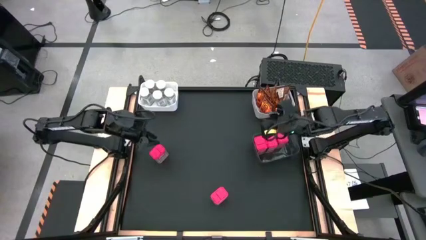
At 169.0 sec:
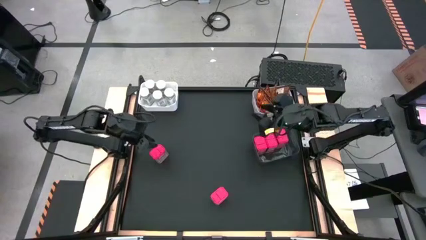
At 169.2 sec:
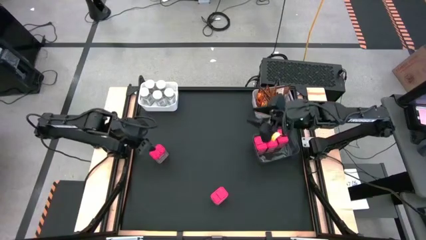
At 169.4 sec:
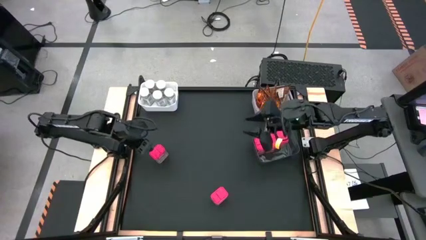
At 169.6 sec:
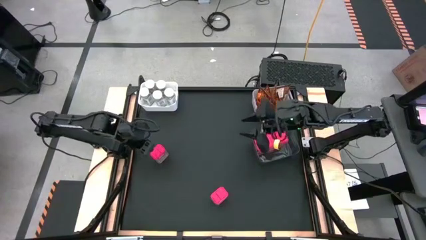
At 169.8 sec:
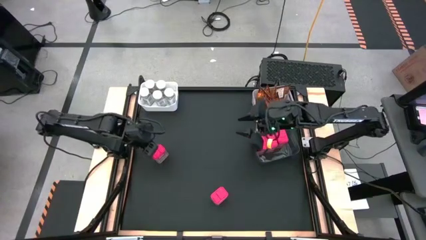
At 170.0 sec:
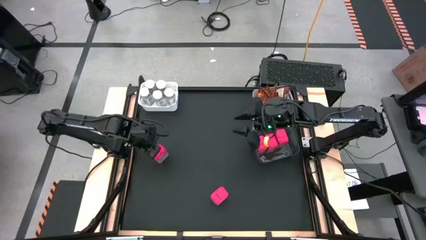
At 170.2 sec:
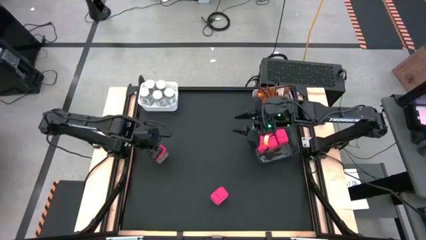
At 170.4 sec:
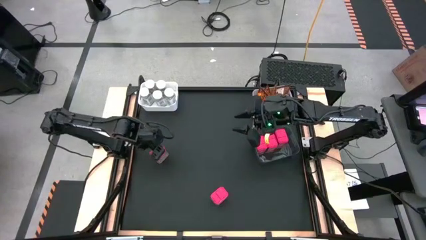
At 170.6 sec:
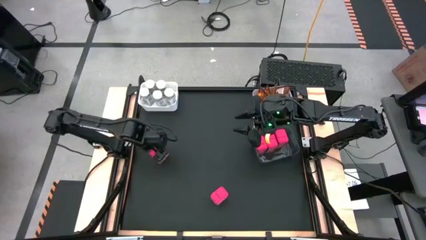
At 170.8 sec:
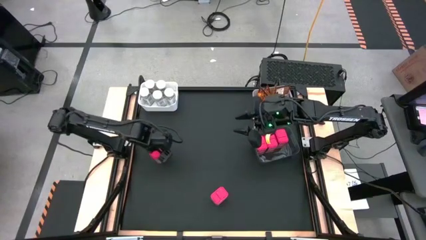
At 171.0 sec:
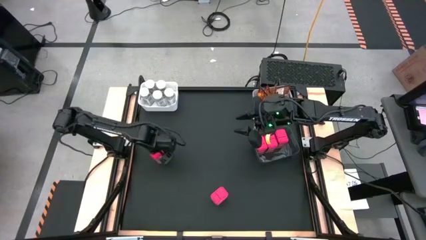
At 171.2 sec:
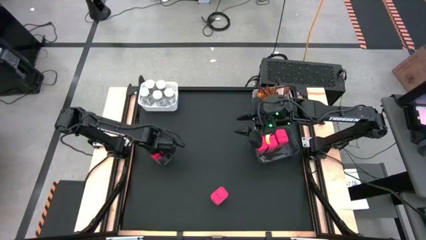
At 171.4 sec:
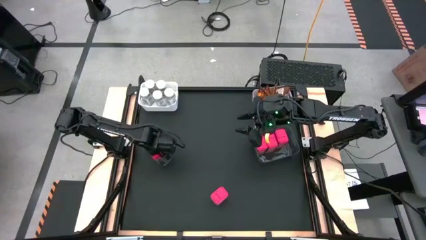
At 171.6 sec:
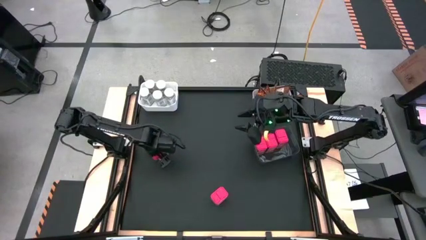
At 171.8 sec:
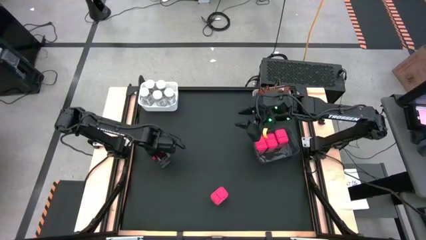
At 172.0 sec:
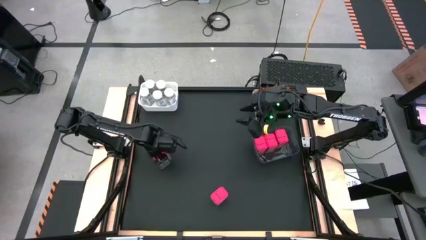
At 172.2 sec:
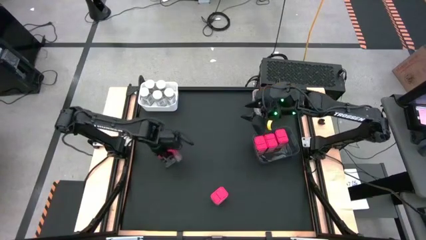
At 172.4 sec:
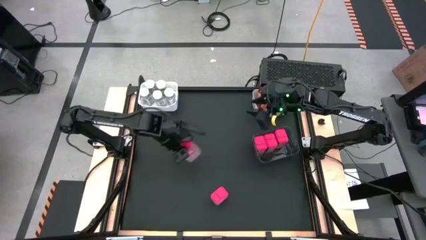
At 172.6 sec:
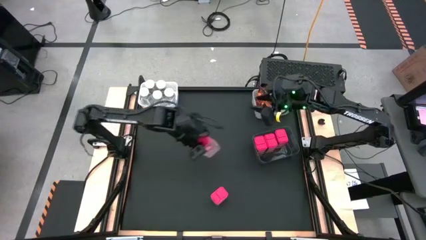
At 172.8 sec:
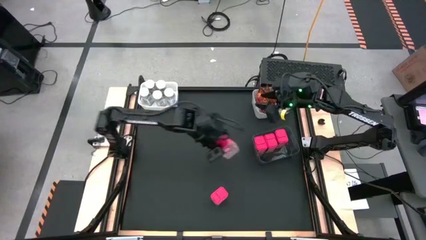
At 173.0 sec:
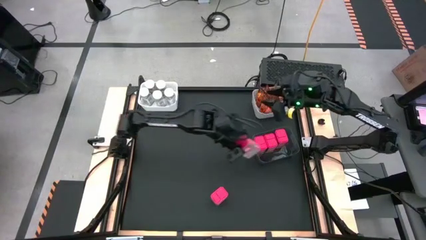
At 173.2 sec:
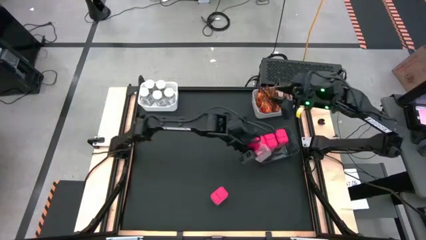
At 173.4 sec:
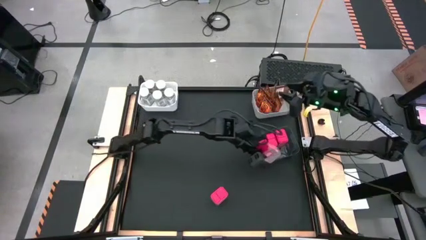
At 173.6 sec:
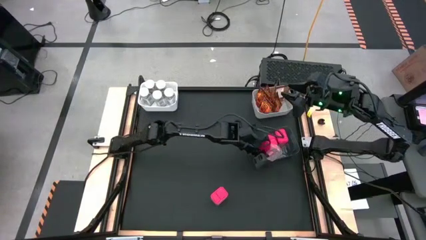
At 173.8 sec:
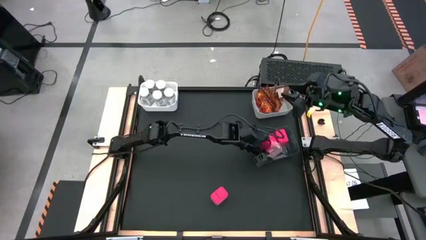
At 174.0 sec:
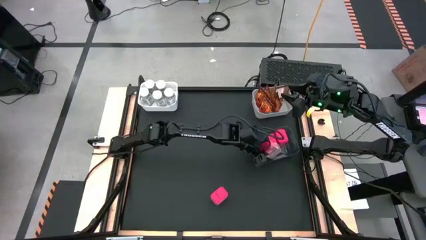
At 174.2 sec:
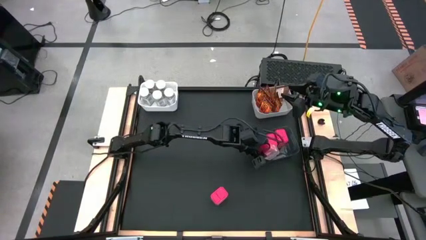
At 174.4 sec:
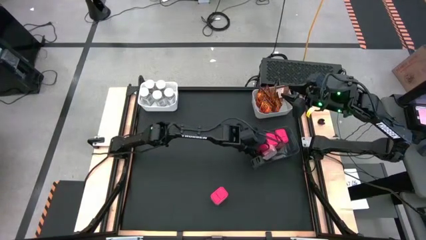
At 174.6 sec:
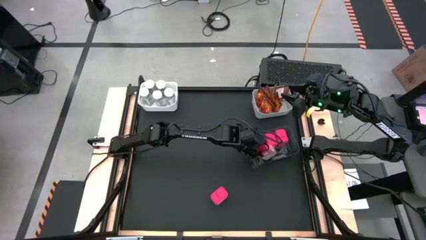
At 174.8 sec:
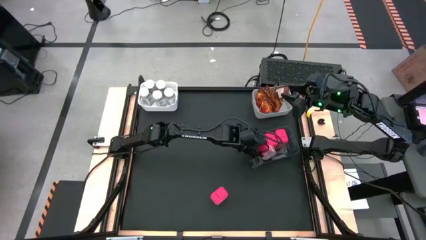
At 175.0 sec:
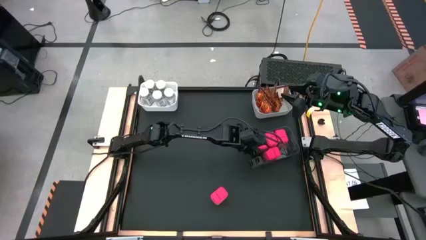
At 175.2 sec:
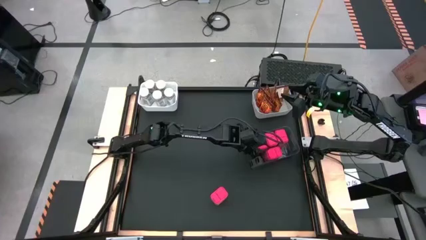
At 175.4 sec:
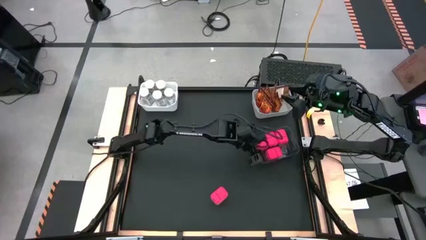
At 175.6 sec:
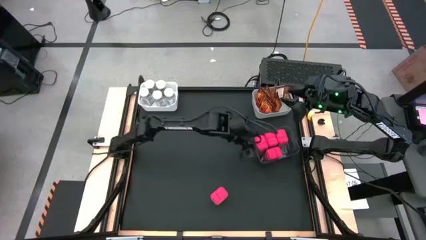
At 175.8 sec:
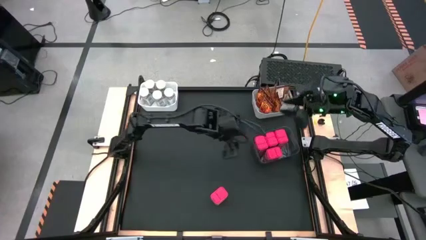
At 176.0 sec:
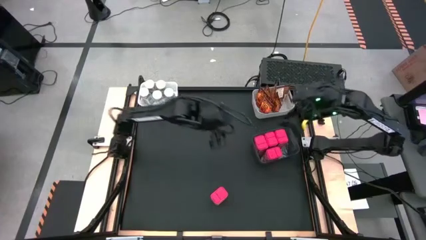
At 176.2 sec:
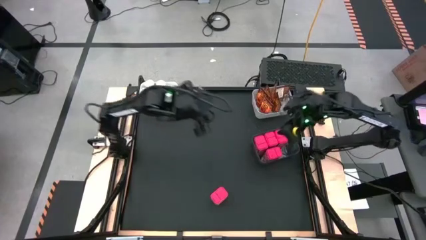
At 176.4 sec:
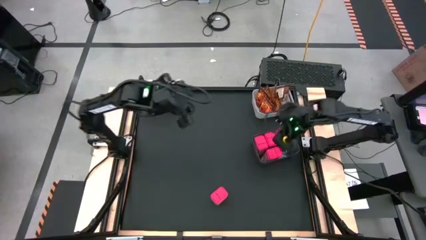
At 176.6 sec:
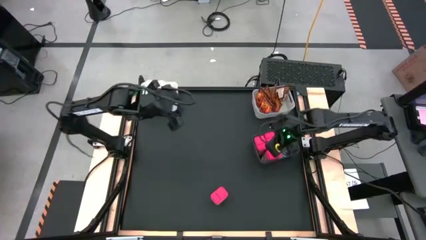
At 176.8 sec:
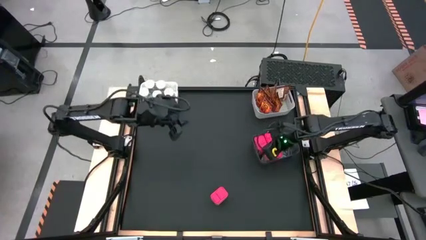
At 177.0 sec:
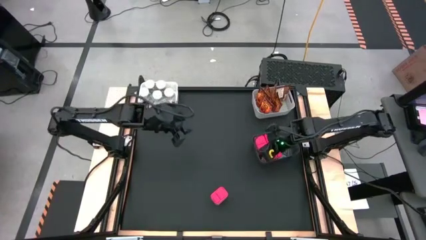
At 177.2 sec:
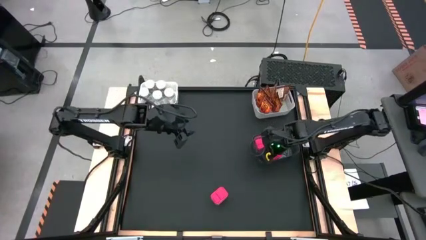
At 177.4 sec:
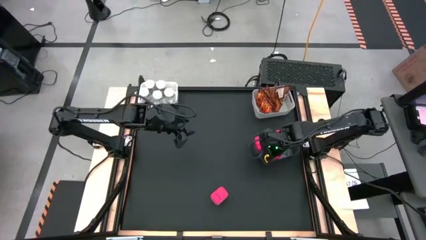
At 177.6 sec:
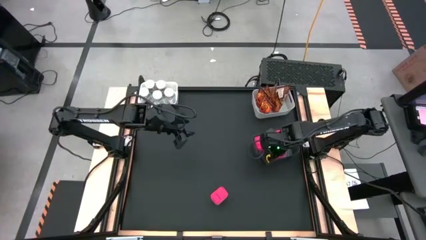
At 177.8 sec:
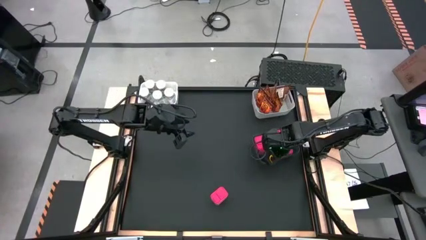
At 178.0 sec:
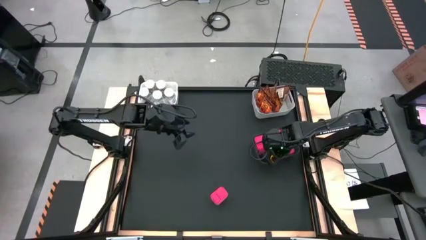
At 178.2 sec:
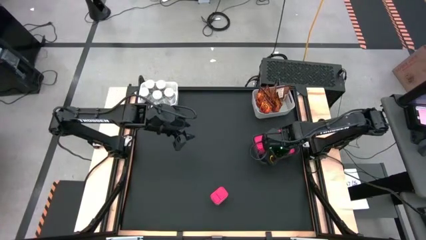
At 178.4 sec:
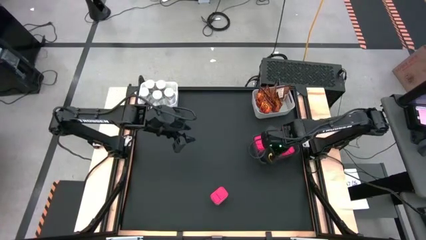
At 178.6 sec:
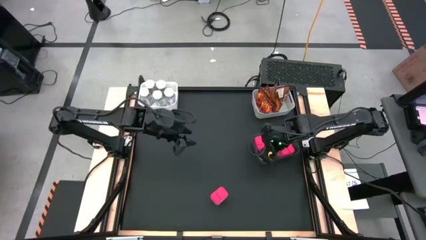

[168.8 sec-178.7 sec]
Task: Sort spices by type
Put the red seasoning can into the black transparent bin
